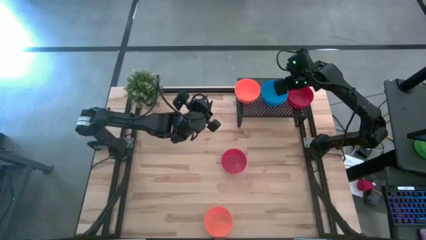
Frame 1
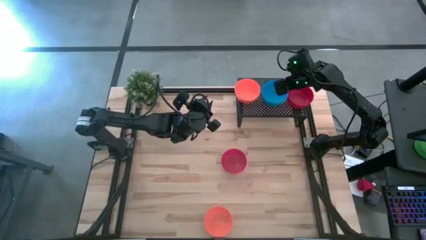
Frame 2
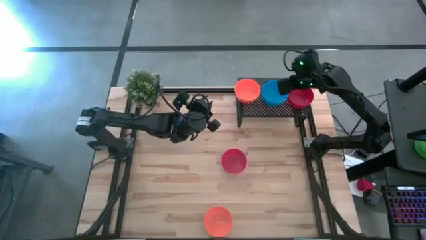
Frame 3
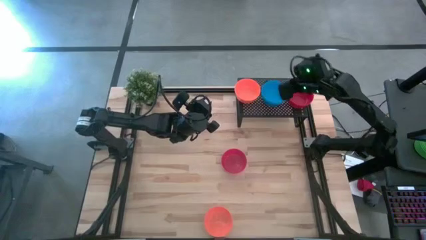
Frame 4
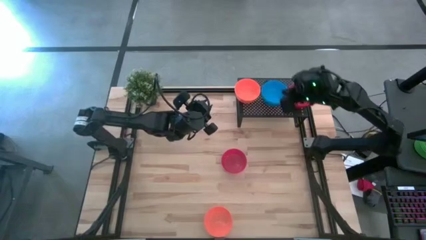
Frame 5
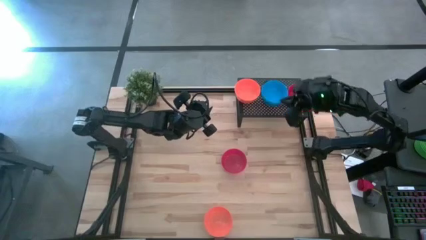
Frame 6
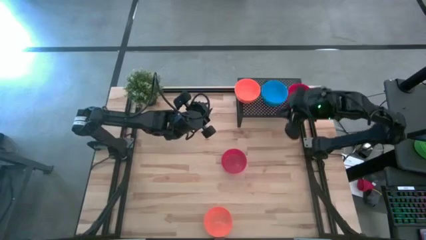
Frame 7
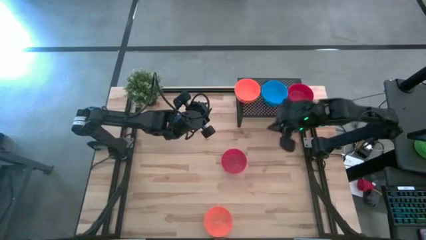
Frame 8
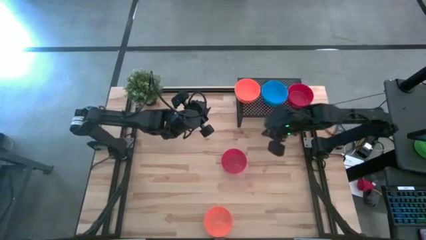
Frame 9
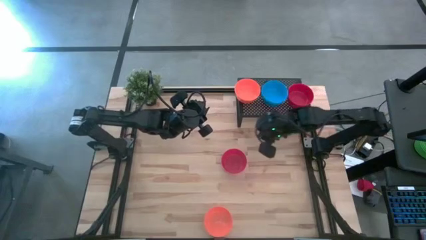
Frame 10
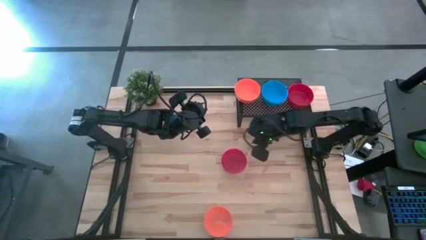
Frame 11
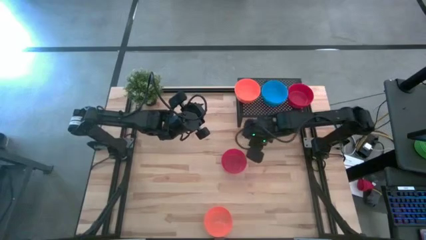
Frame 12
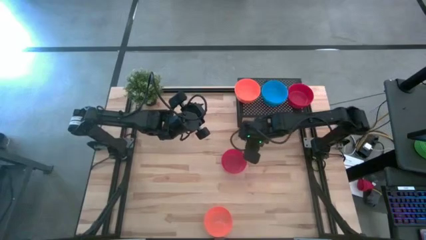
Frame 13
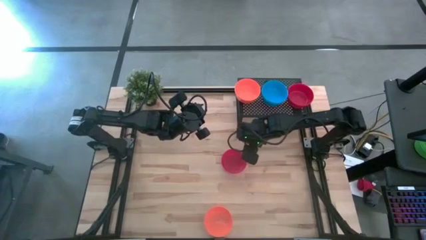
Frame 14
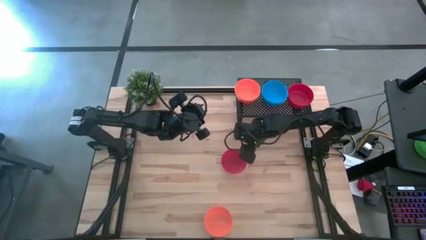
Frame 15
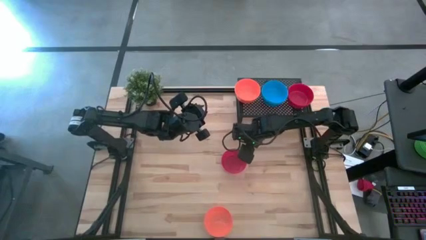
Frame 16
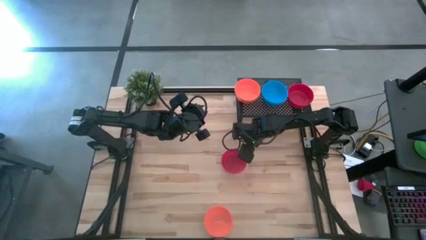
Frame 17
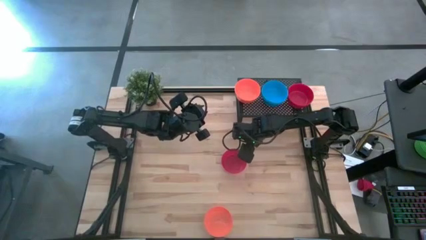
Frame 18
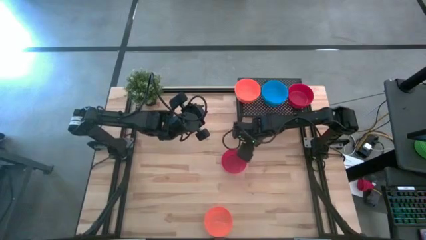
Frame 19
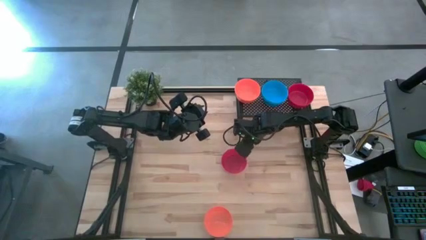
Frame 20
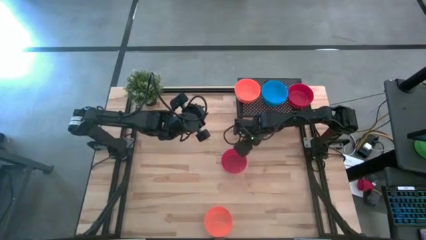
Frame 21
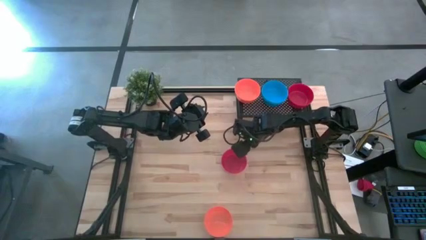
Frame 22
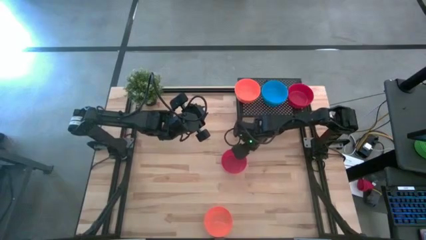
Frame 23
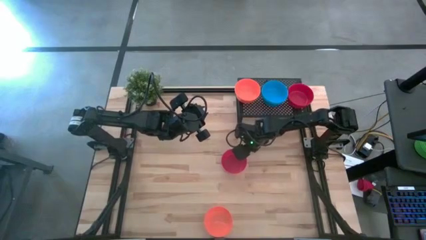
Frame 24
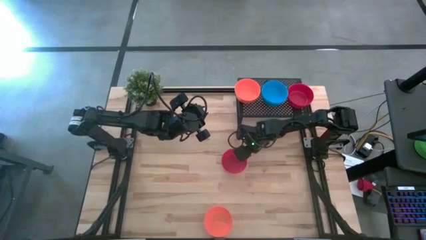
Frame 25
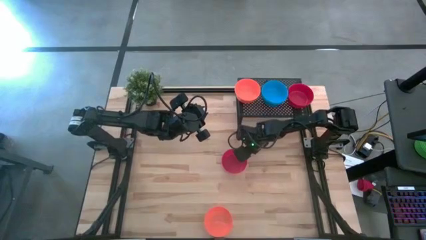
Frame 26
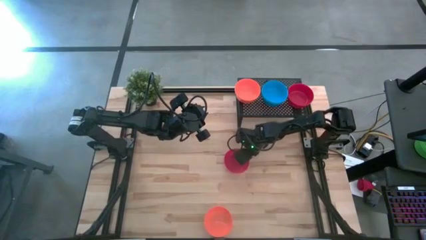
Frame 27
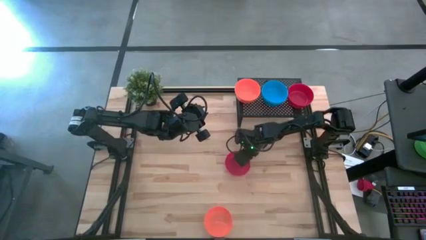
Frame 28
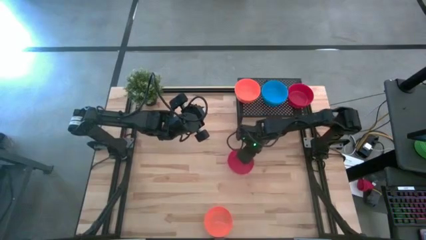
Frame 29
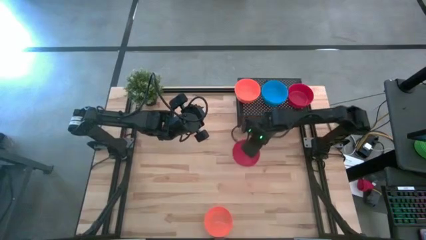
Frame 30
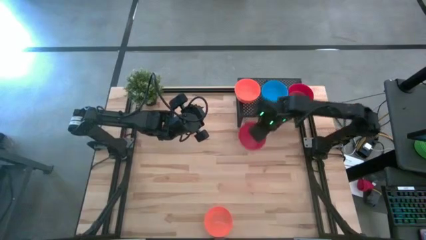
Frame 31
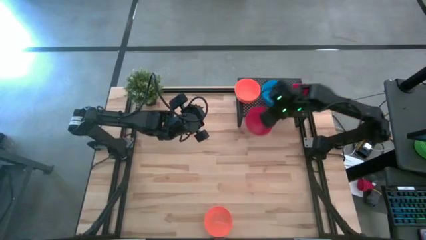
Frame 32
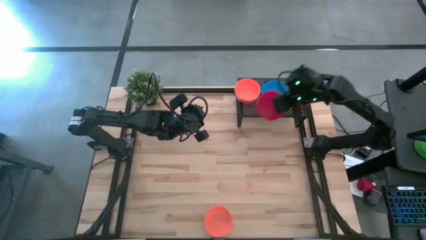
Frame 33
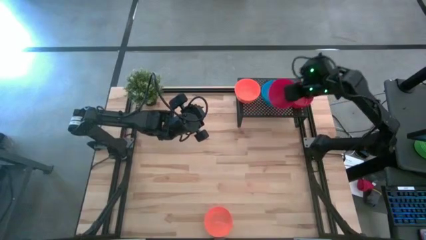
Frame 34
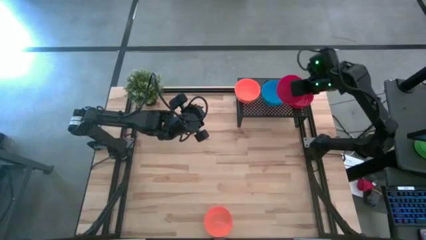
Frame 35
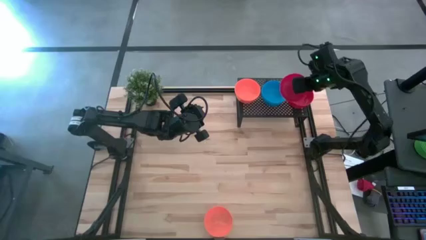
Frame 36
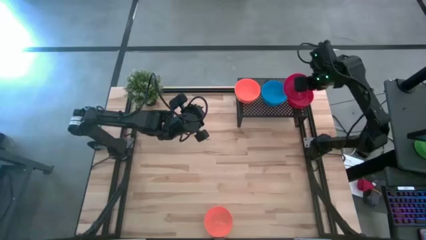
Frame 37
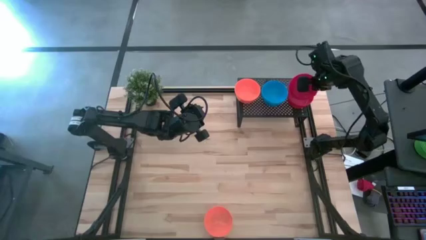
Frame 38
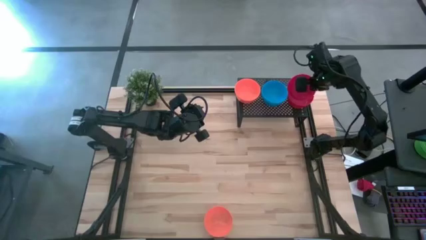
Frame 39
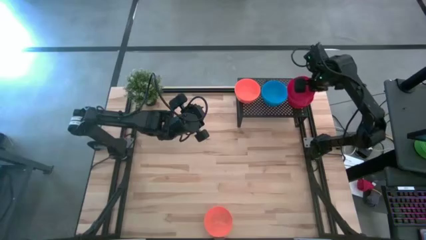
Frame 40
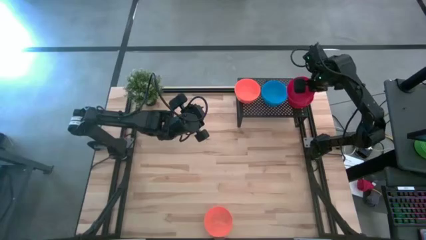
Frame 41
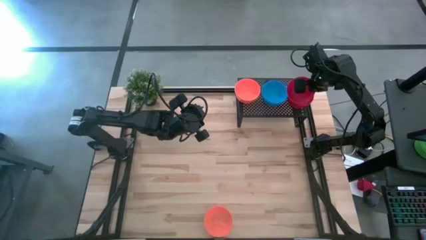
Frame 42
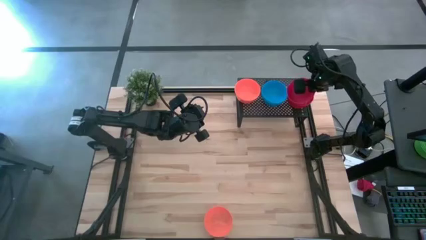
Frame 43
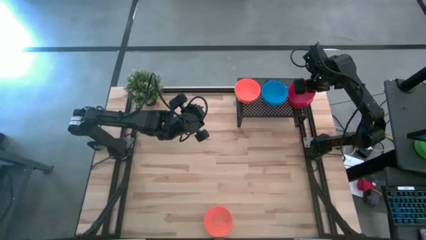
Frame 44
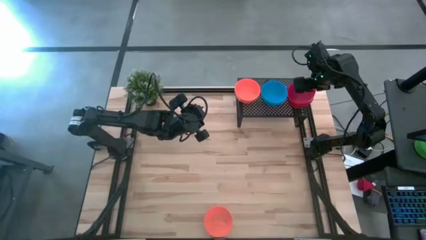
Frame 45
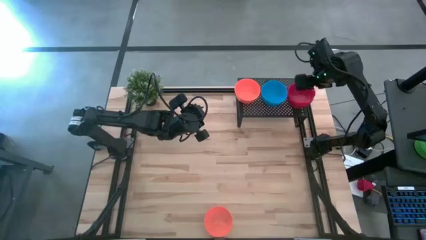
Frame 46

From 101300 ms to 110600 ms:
Task: Pick & Place Mini bowls
Stack the red bowl on top of the stacked red bowls on the shelf

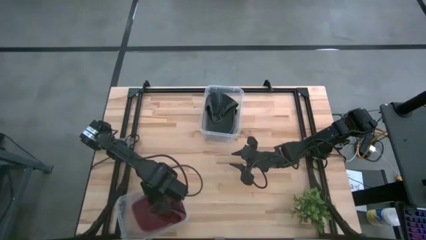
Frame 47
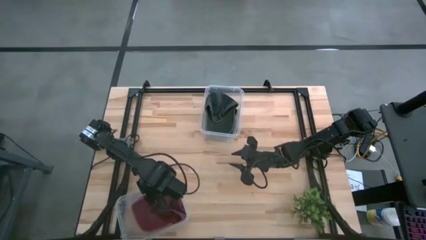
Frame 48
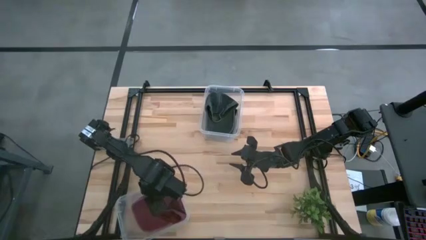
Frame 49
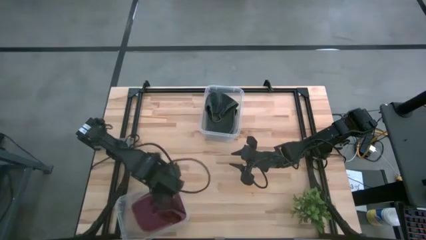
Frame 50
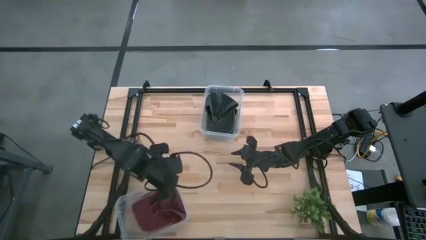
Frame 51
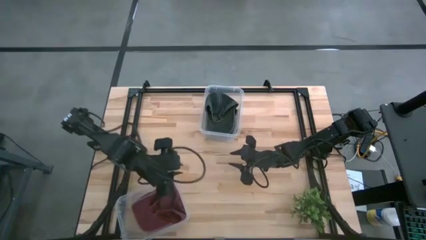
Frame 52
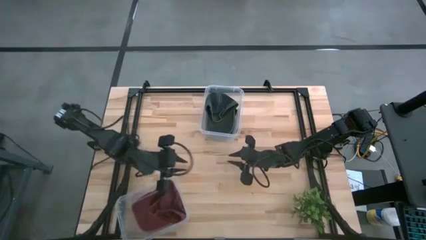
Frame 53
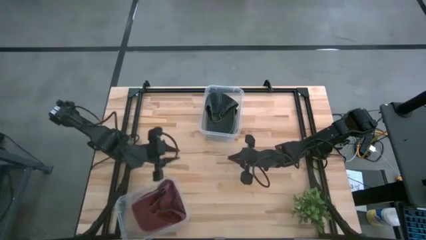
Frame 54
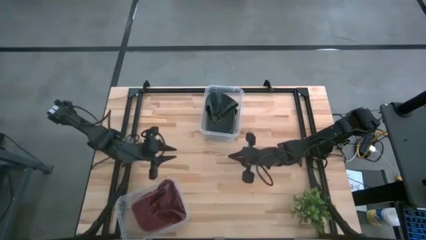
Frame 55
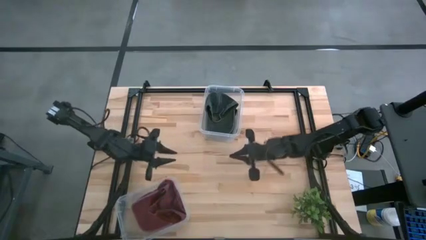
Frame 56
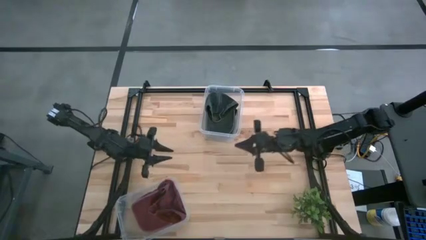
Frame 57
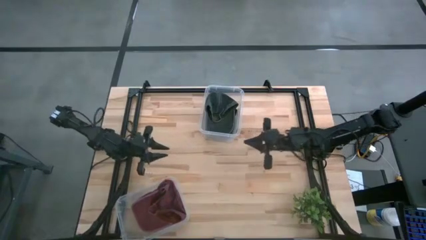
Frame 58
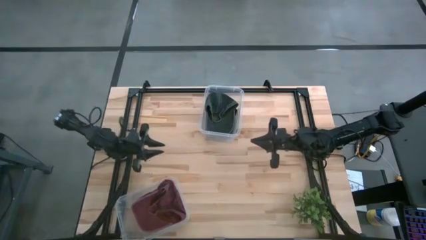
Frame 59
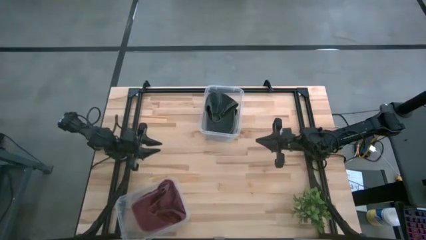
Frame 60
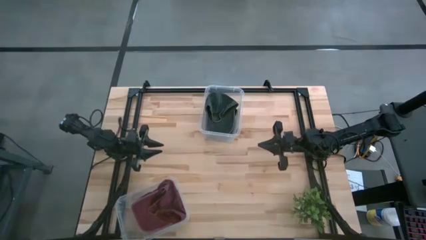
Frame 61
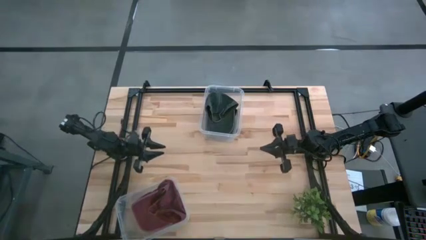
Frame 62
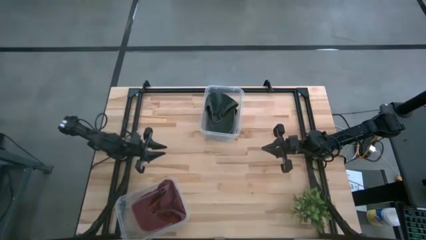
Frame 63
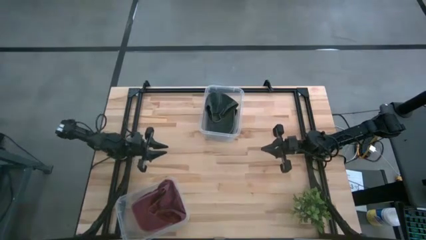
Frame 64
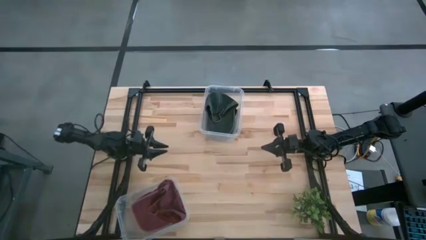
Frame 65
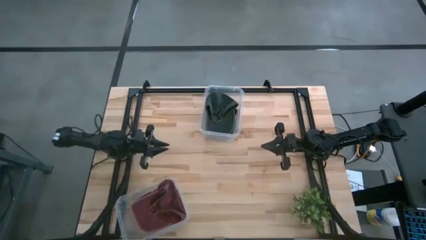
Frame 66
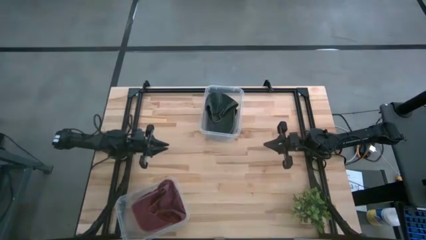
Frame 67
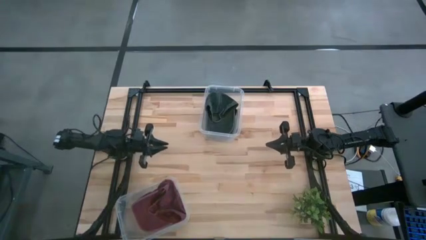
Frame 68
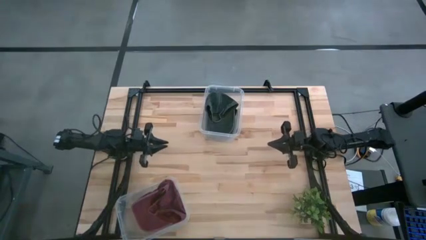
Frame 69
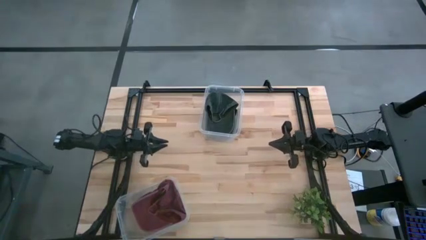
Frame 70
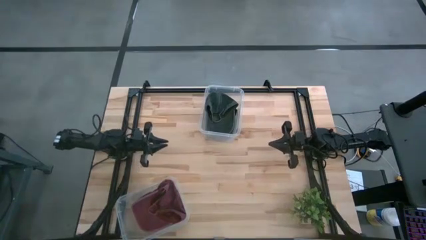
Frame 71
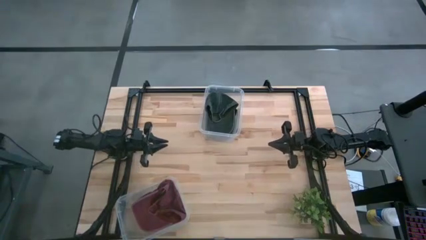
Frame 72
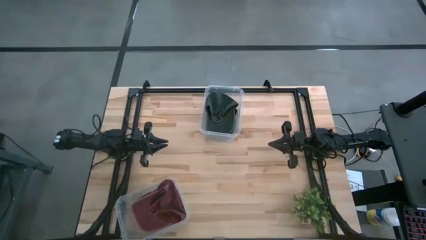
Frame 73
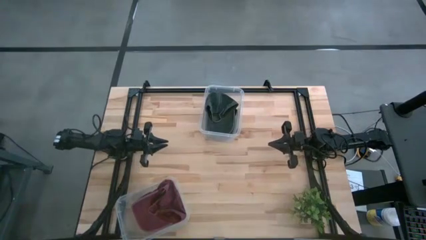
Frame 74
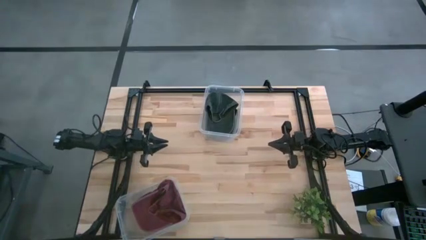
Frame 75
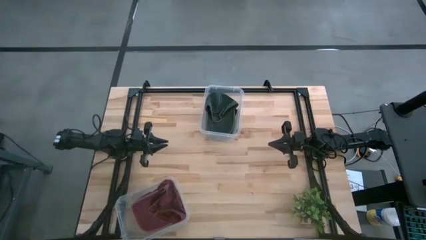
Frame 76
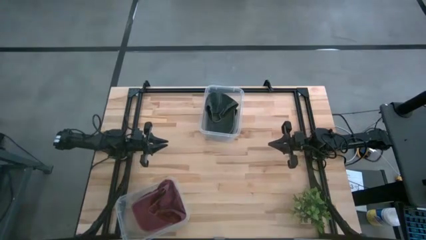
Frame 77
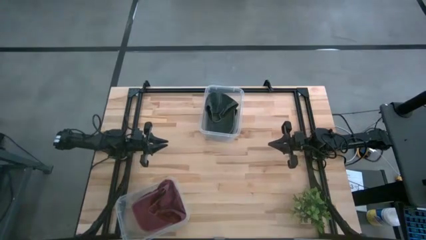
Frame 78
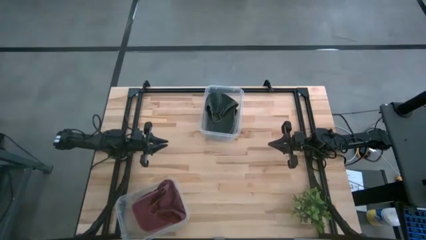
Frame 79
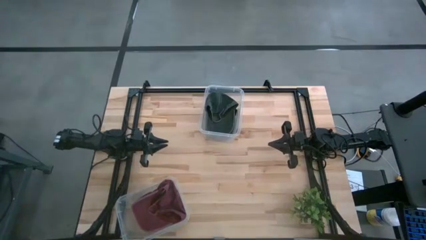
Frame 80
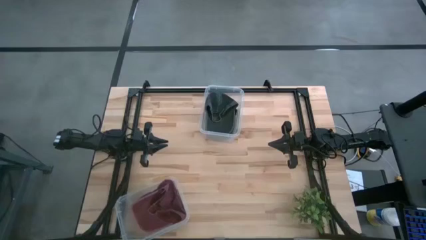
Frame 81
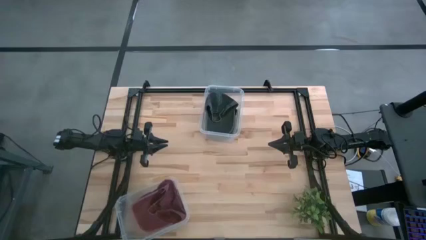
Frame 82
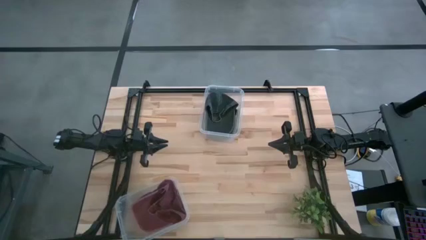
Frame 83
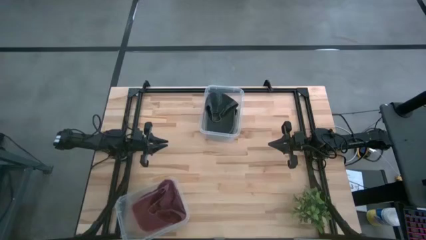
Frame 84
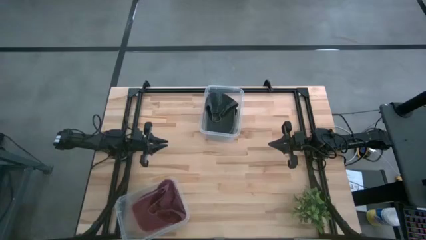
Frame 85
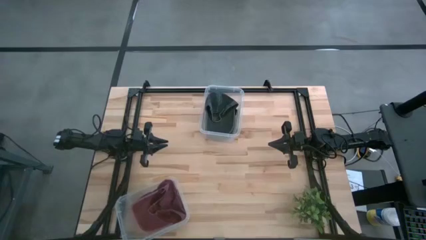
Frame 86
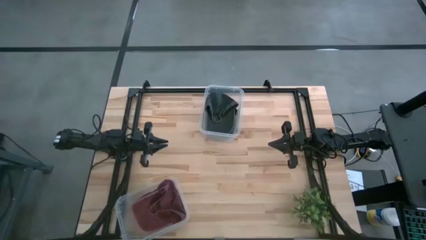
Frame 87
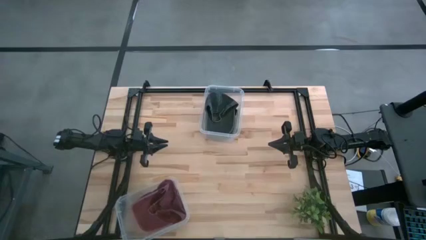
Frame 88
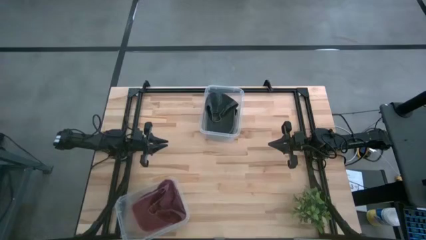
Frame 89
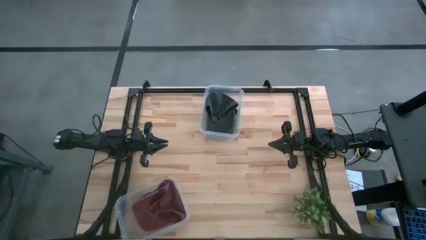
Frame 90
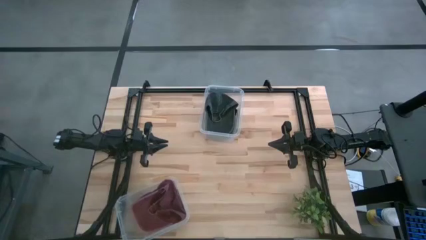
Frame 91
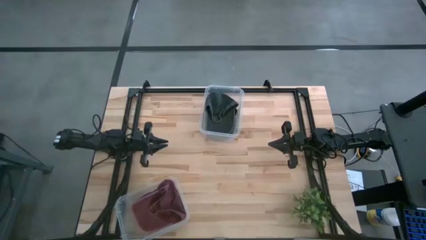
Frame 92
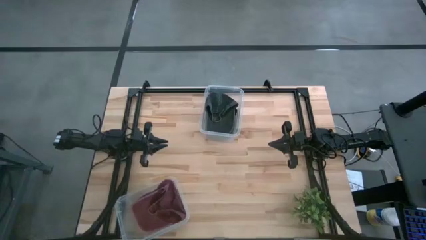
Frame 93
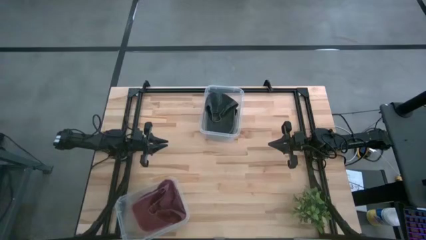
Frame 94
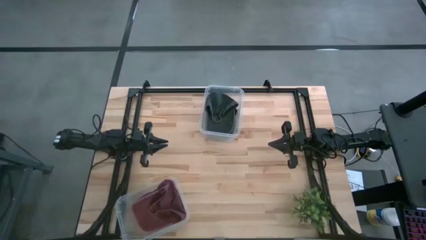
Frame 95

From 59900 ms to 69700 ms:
Task: Pick and place caps into container
Return to home position
